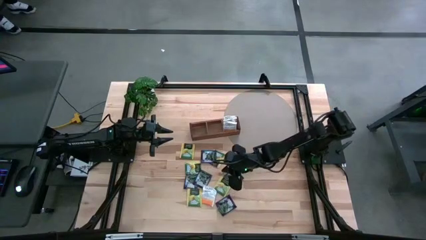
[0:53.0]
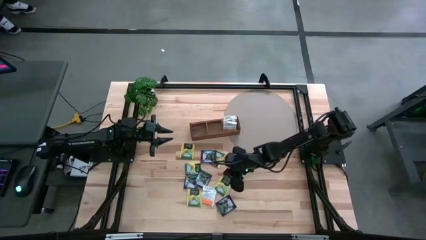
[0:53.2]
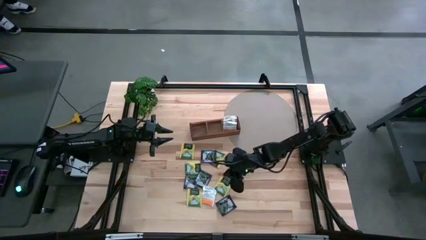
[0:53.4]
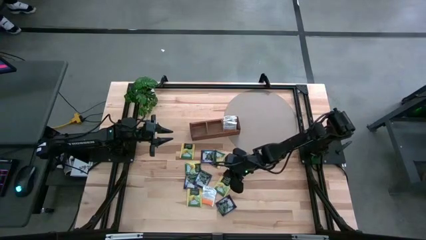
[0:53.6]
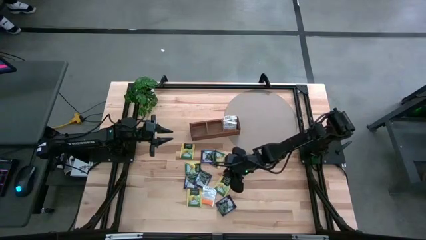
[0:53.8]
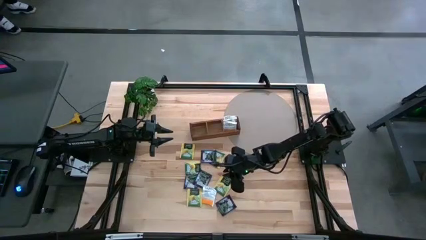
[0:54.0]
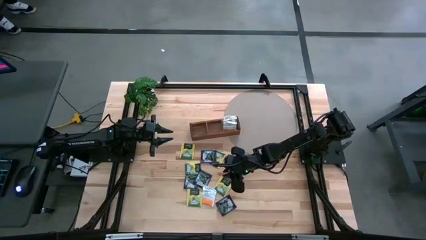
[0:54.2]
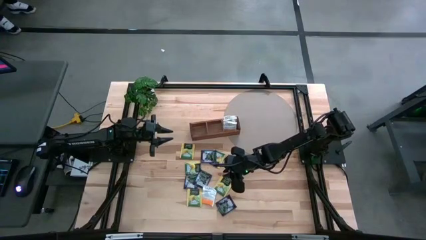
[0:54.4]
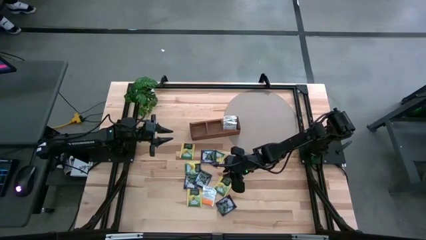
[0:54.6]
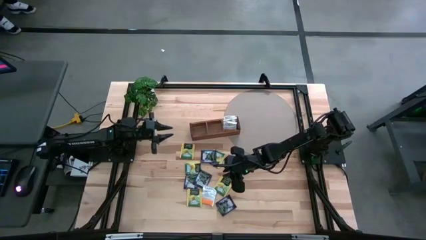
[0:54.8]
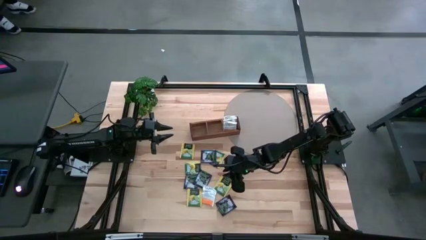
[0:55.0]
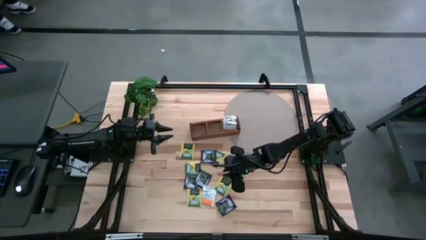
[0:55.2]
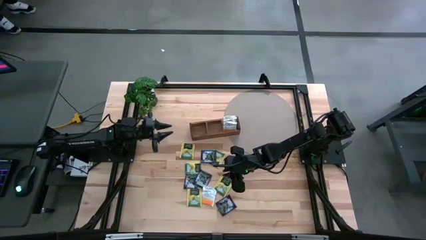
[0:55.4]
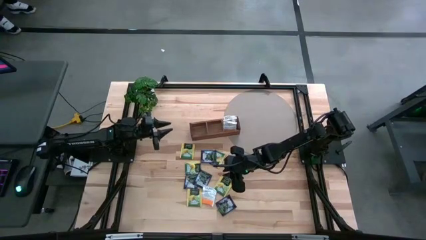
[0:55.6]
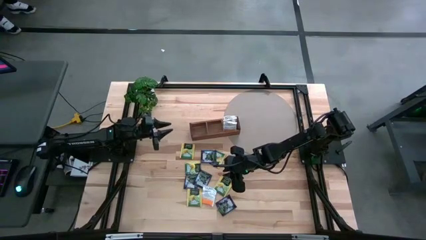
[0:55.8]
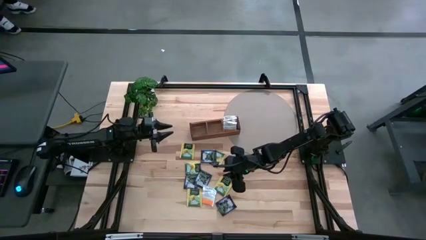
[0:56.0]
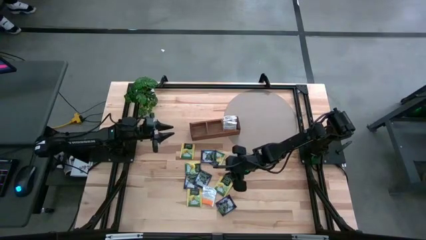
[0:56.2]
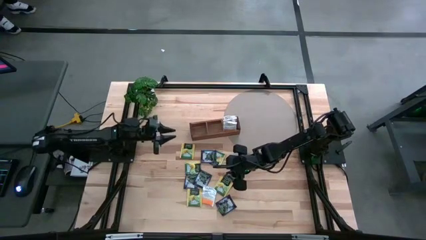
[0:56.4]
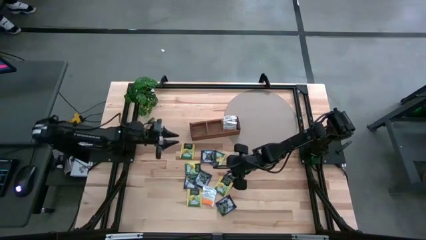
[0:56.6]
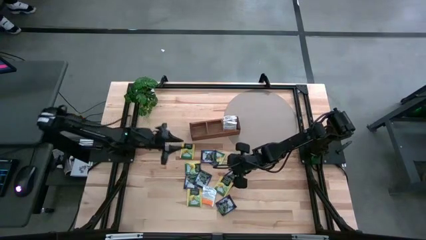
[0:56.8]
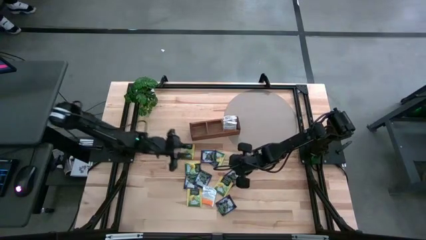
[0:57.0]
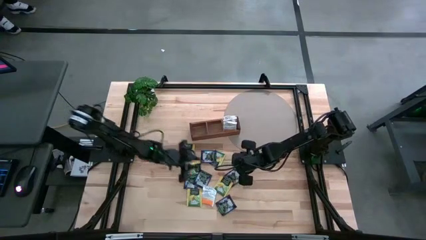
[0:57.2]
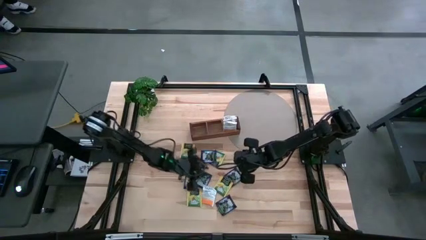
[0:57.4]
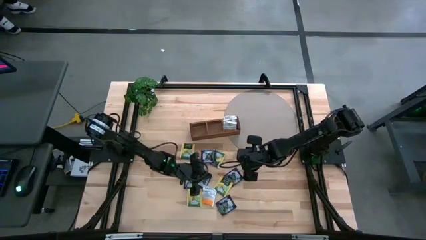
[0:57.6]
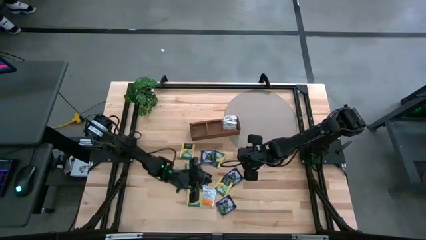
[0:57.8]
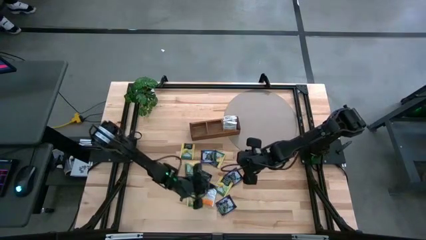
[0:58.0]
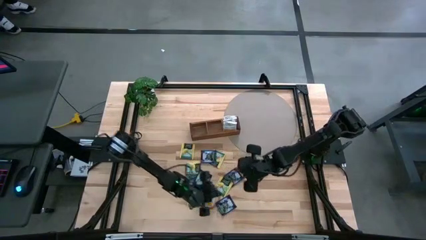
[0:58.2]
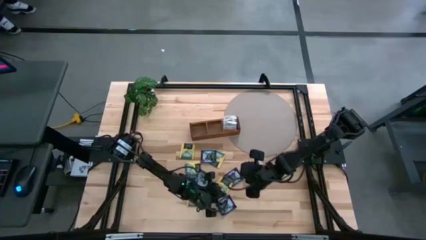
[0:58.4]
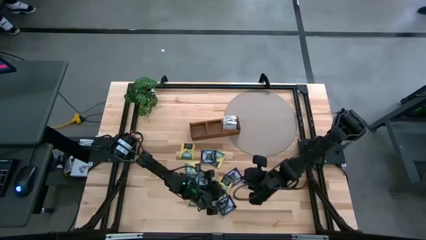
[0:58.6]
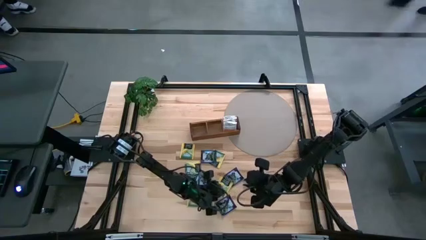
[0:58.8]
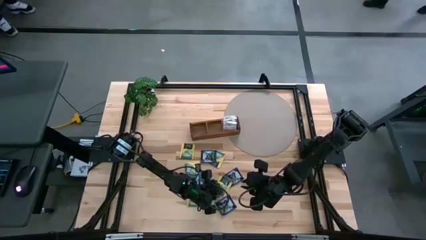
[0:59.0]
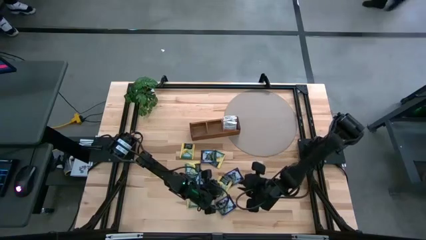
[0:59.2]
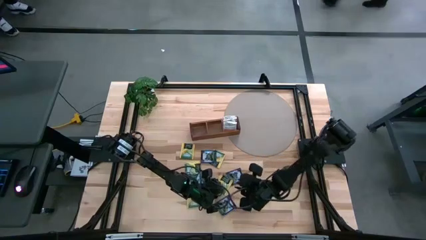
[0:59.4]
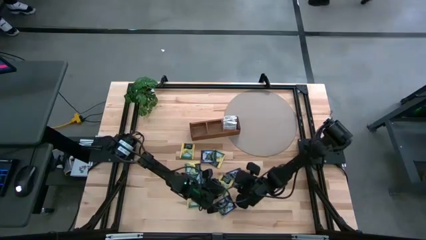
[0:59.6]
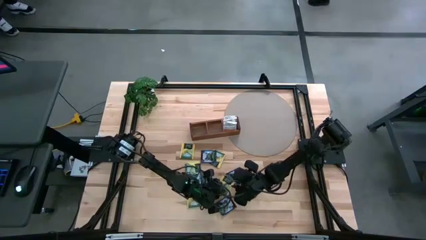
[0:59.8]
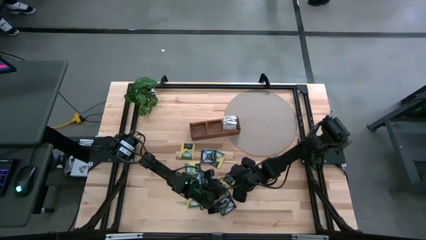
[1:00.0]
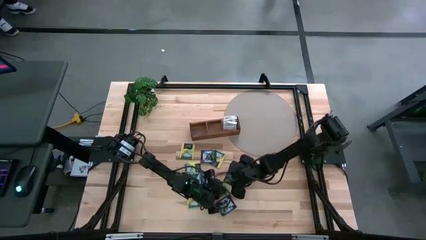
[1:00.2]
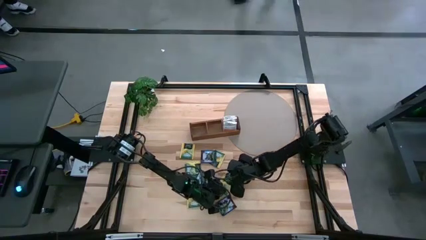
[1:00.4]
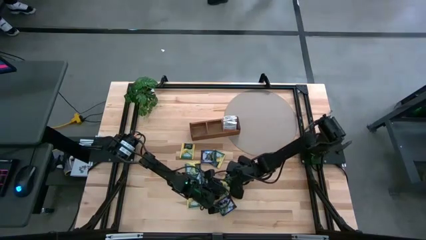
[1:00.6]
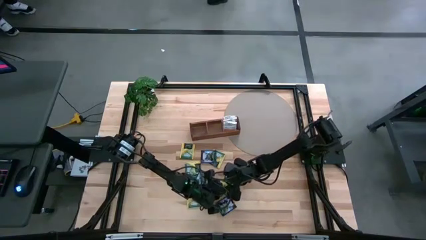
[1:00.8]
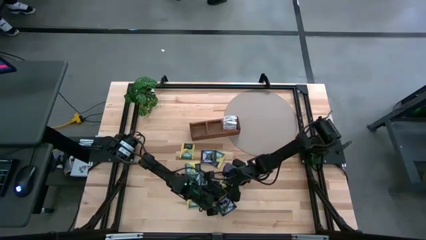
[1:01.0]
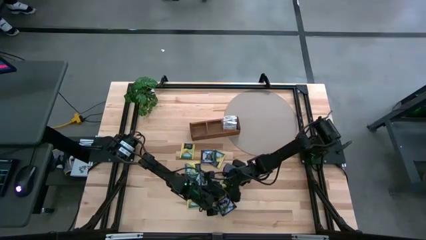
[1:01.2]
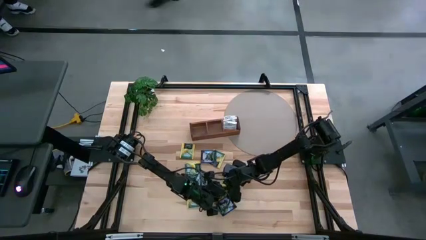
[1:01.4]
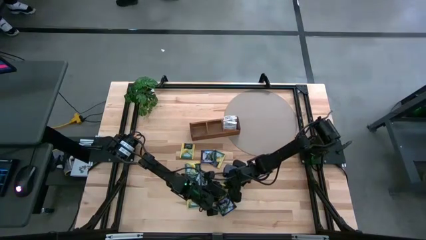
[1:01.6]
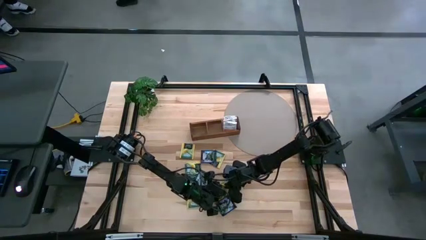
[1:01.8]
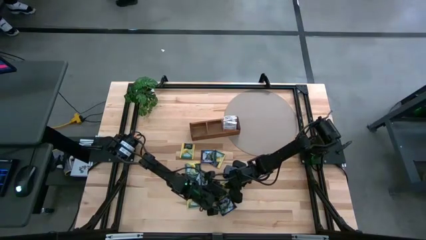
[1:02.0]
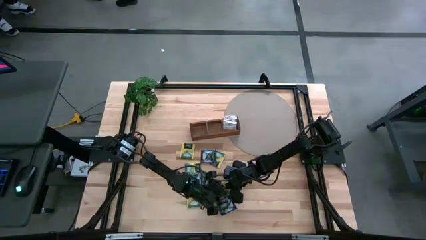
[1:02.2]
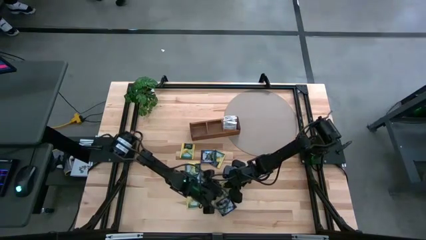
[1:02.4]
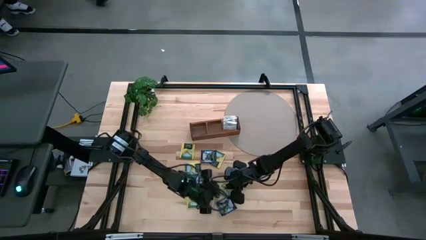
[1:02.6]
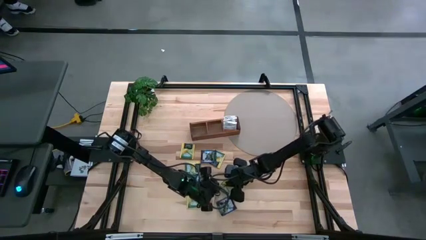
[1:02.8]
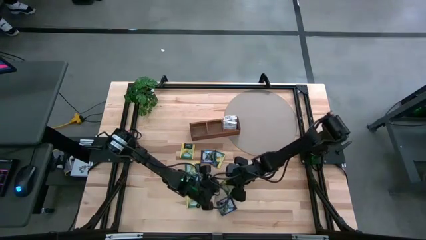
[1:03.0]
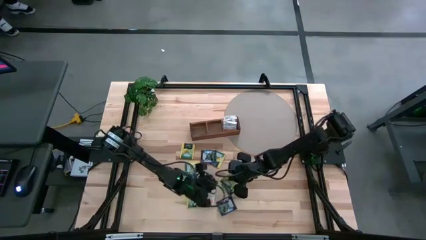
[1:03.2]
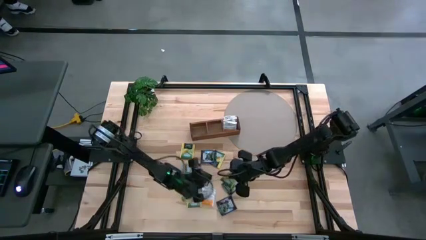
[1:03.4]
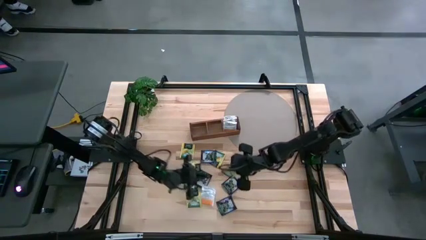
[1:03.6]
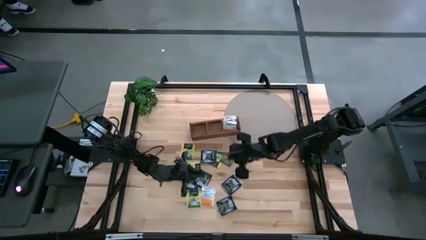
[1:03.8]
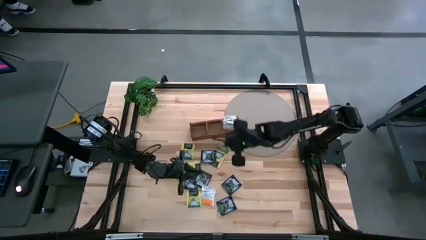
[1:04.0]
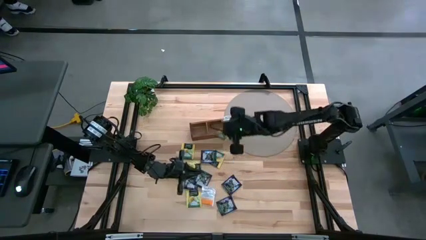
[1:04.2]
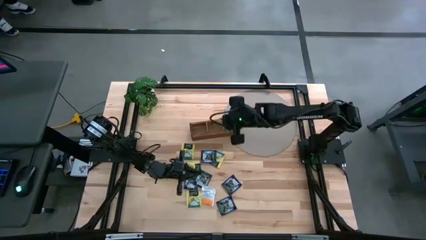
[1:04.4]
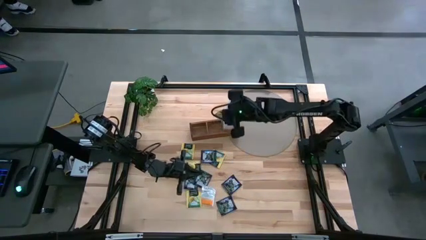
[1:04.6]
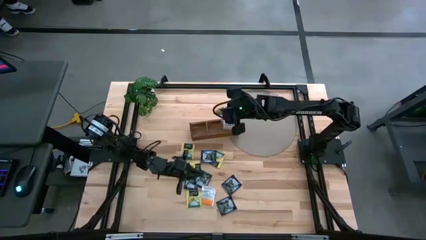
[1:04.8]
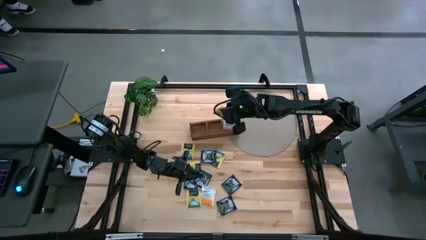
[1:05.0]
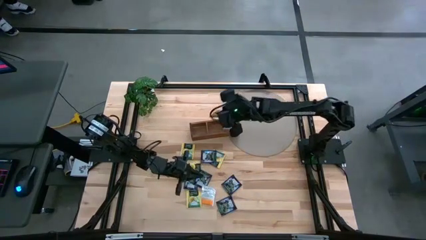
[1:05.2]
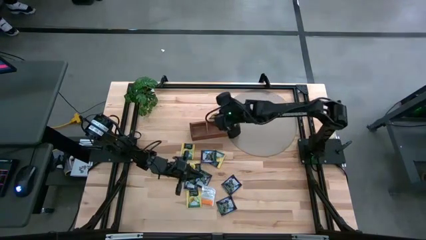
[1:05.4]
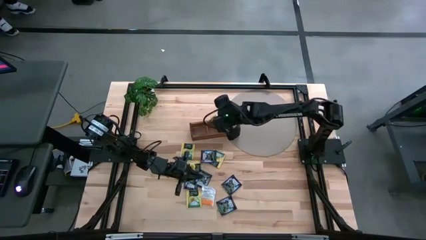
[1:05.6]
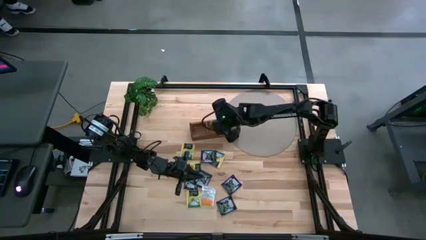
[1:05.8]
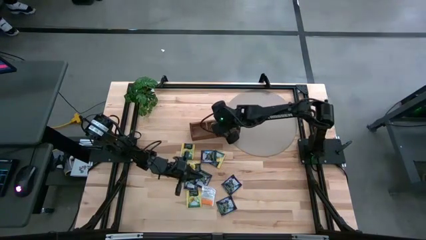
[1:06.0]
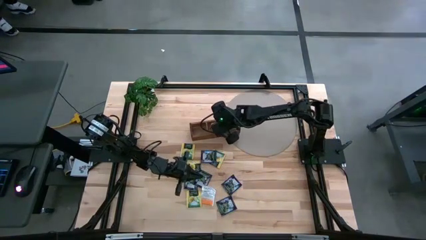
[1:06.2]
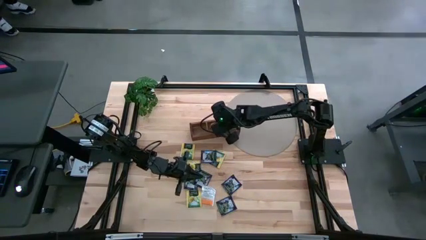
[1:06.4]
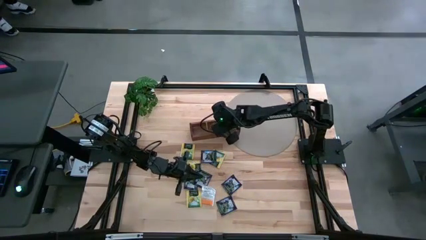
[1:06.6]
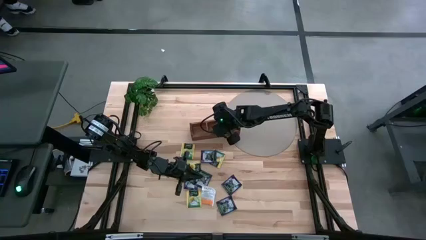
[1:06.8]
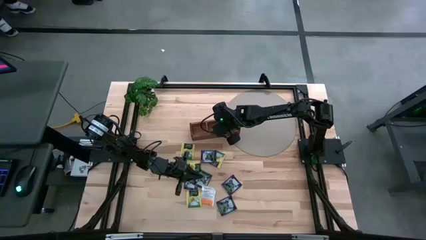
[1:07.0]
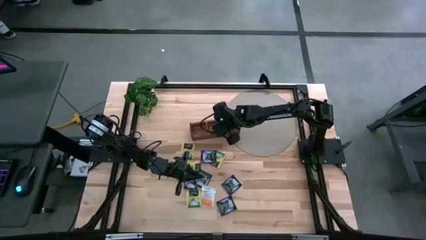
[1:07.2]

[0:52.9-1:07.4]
Task: Pick & Place Tea
Put the yellow tea bag into the middle section of the wooden organizer
